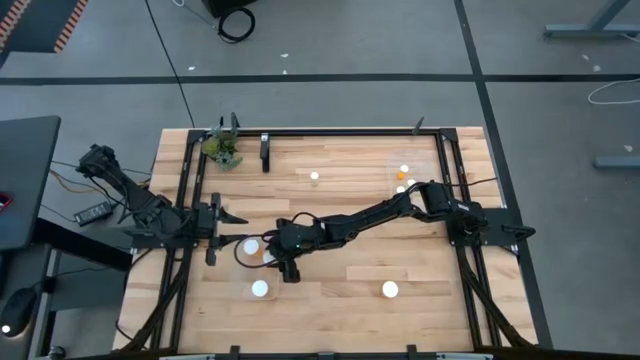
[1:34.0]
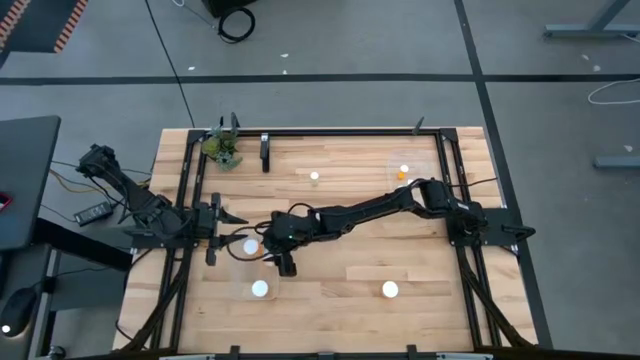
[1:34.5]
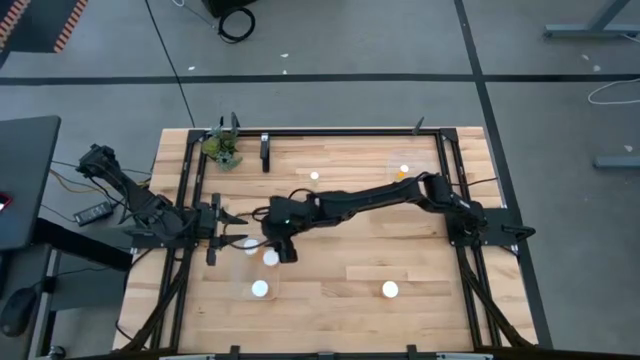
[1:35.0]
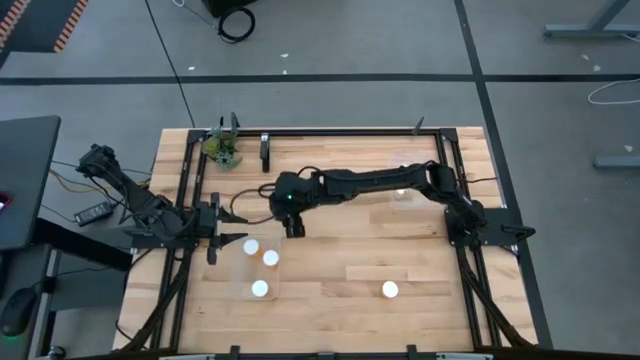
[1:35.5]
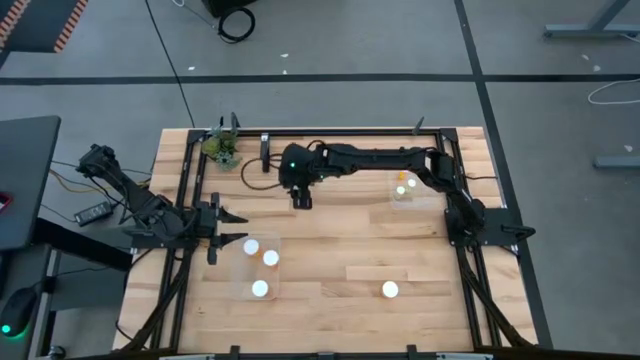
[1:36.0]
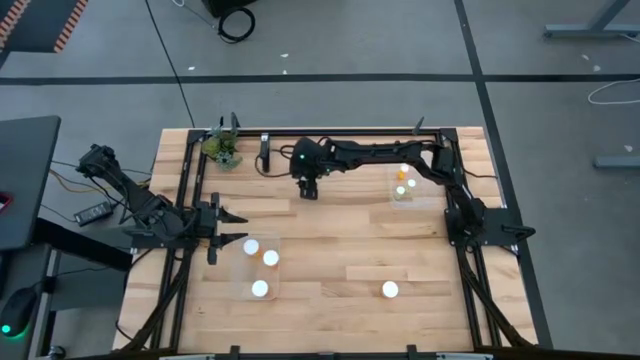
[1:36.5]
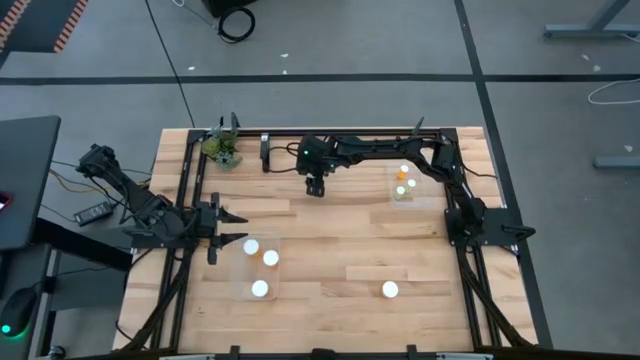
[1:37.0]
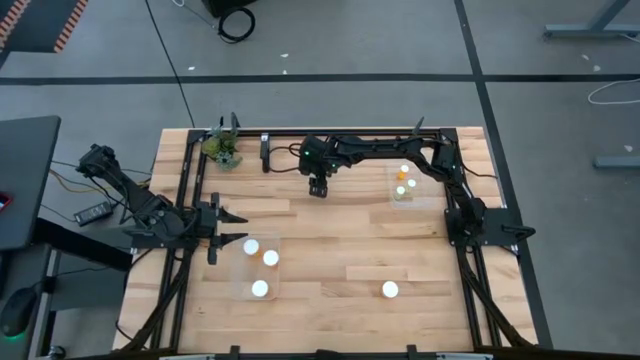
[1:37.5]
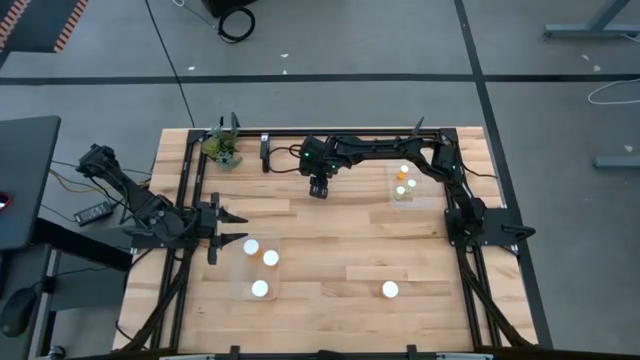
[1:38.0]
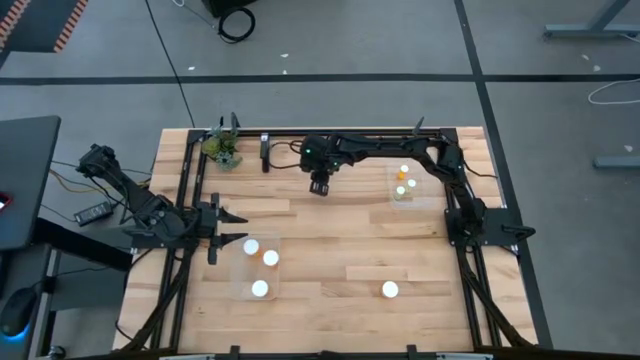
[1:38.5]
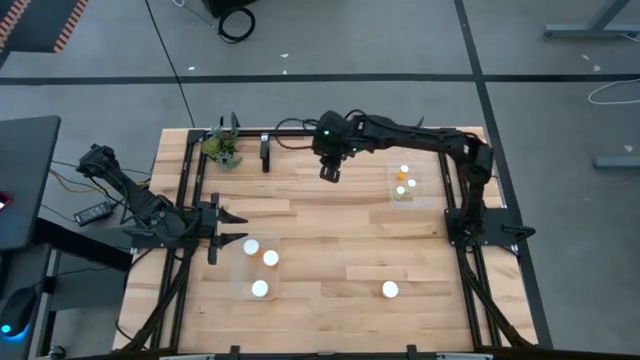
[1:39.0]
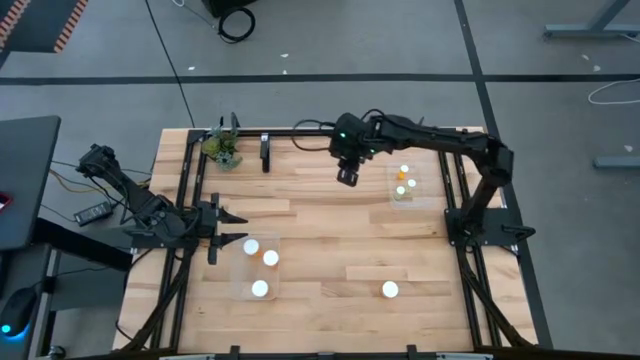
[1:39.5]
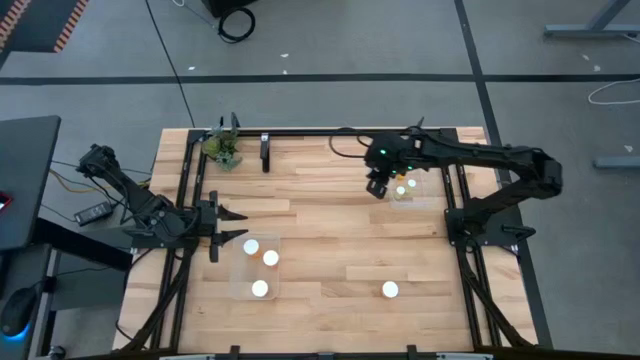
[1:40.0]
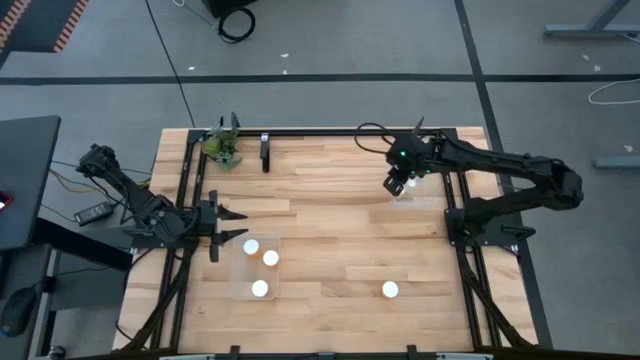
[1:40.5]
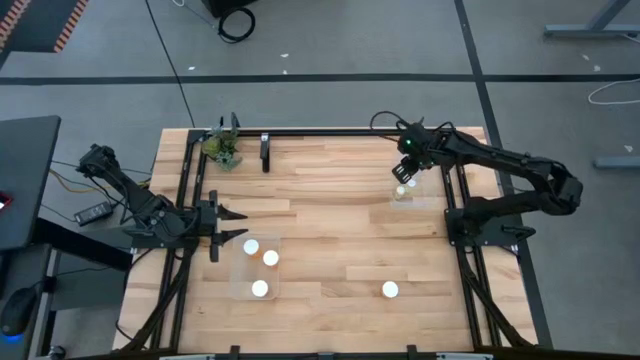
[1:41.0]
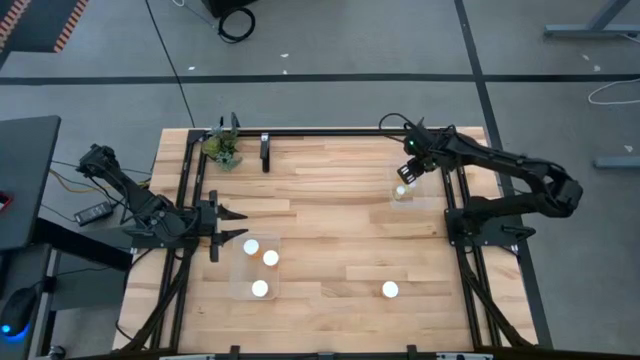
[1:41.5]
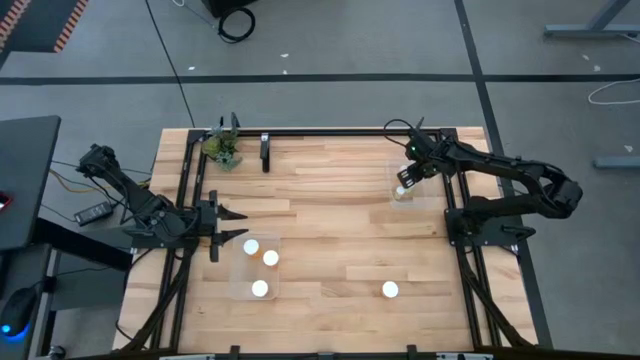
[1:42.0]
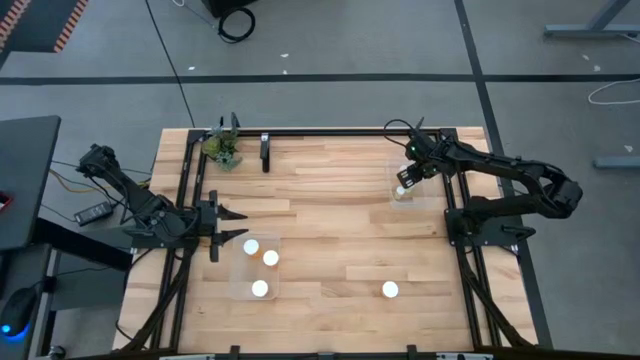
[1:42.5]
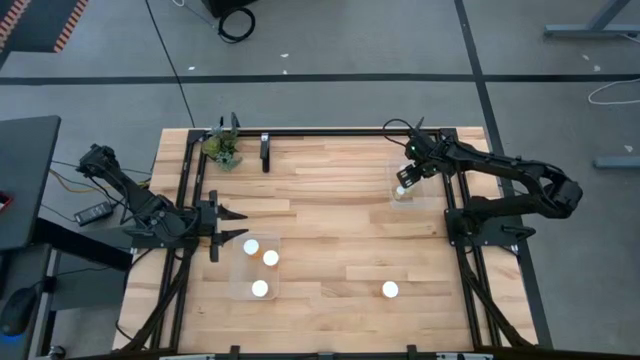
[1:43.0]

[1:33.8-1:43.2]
Task: Pick and place medicine bottles into bin by pill shape (circle, oval)
Put the yellow pill bottle into the top transparent bin

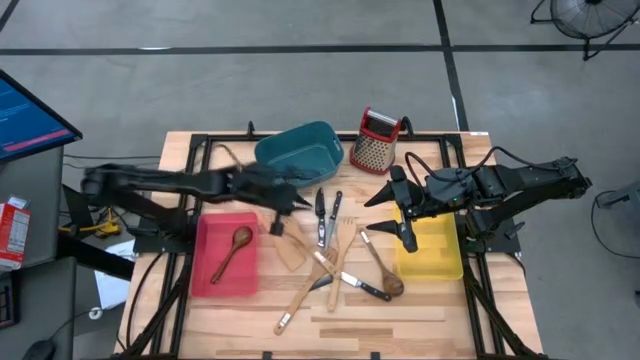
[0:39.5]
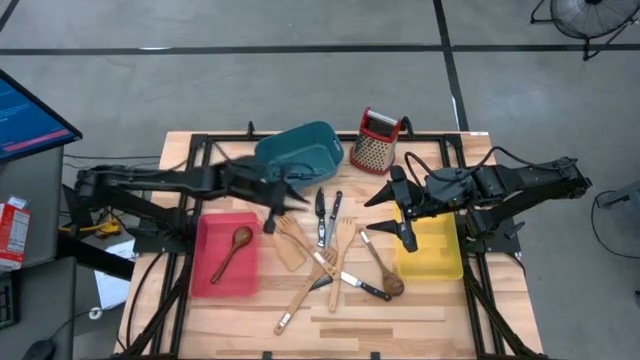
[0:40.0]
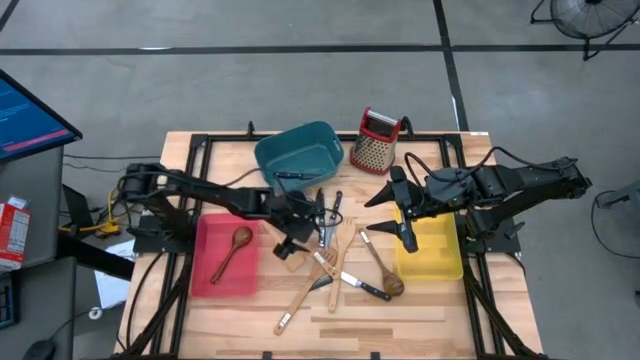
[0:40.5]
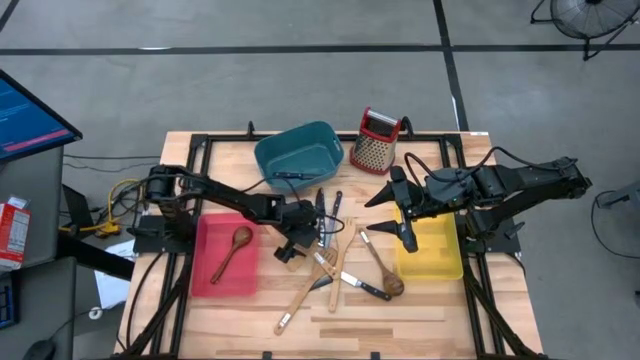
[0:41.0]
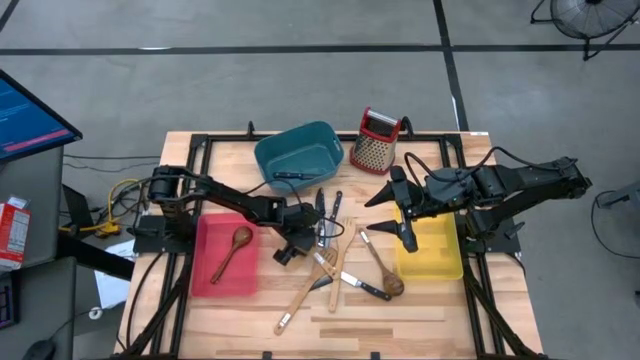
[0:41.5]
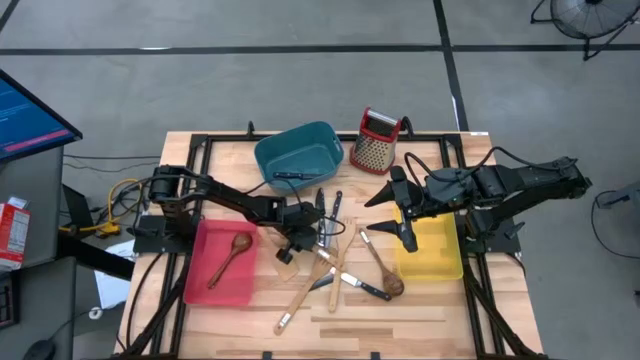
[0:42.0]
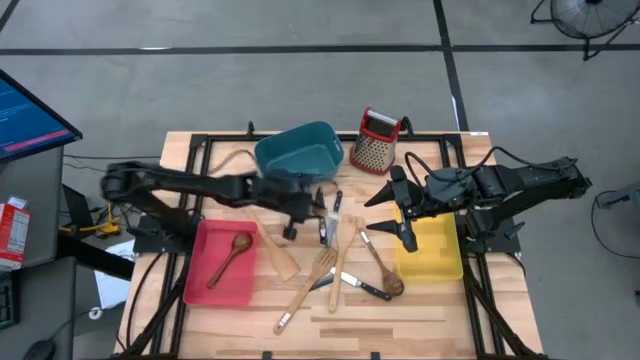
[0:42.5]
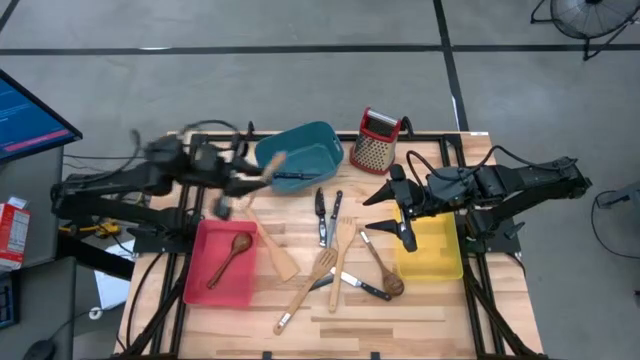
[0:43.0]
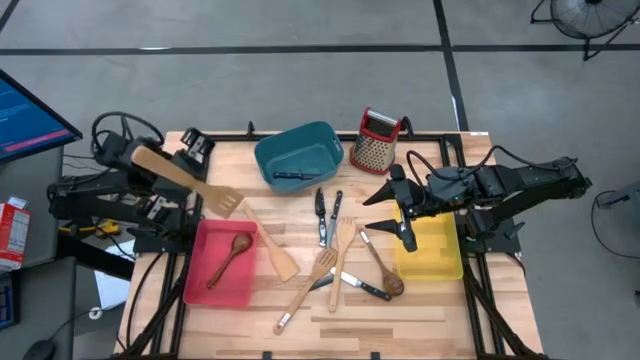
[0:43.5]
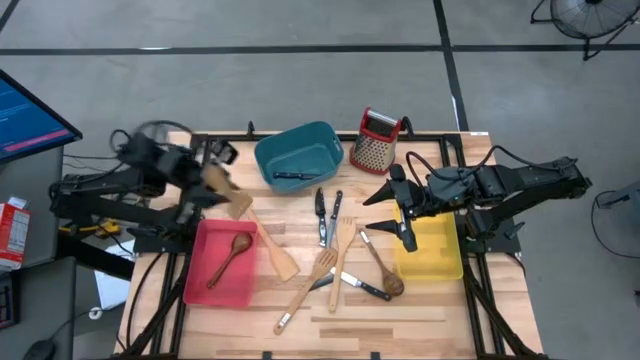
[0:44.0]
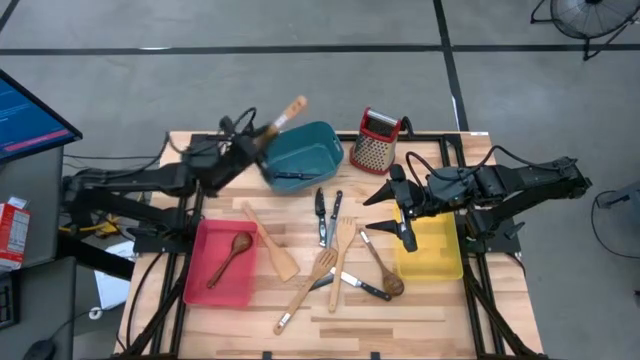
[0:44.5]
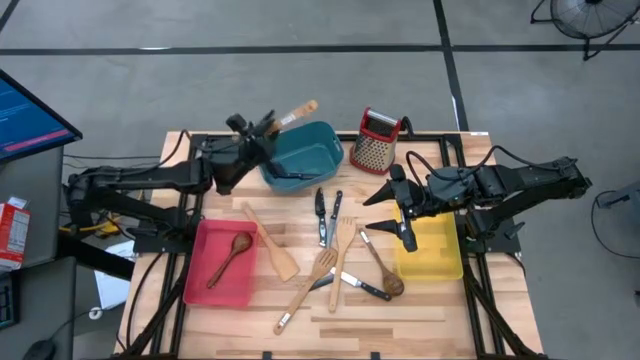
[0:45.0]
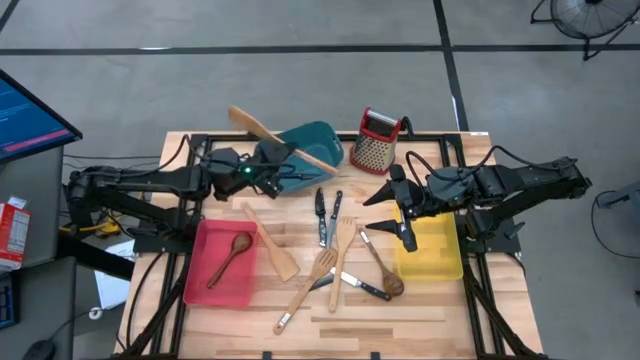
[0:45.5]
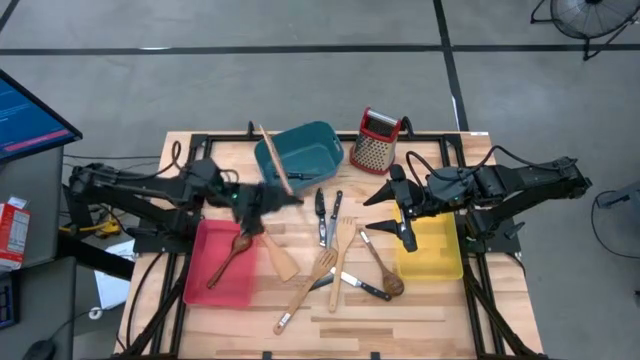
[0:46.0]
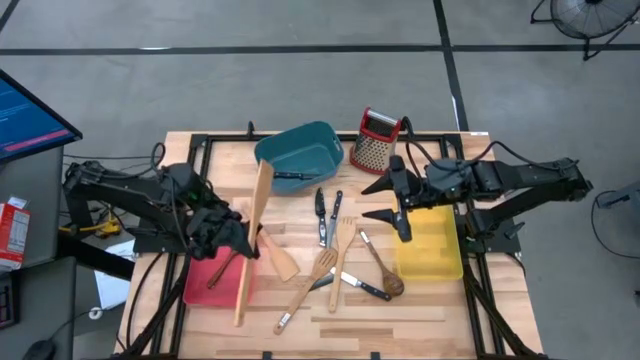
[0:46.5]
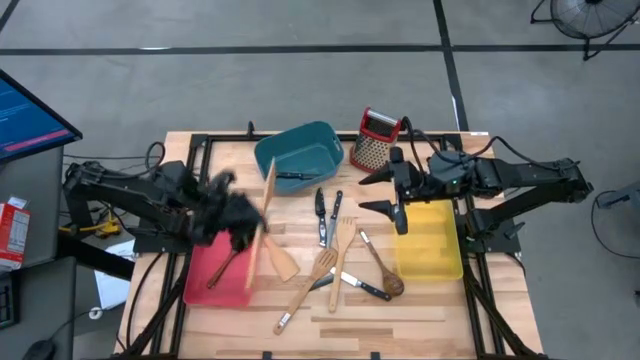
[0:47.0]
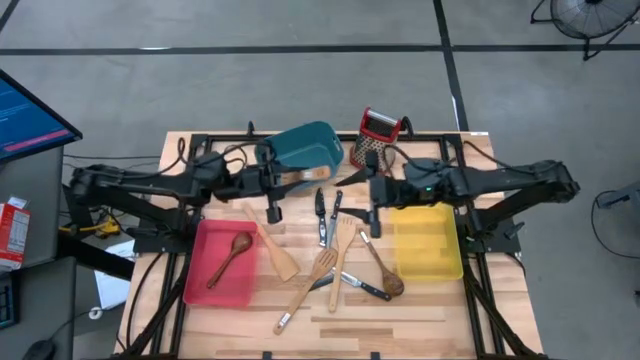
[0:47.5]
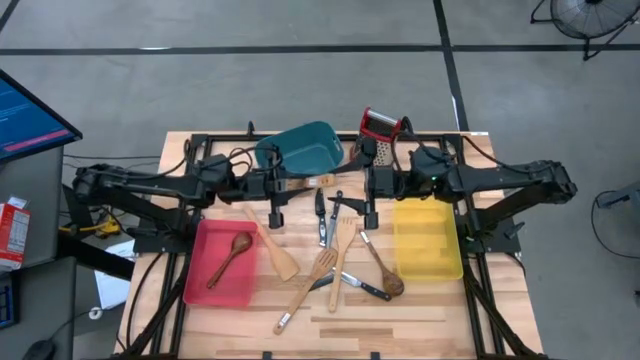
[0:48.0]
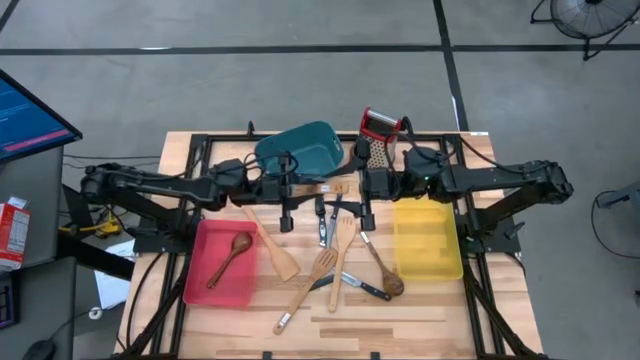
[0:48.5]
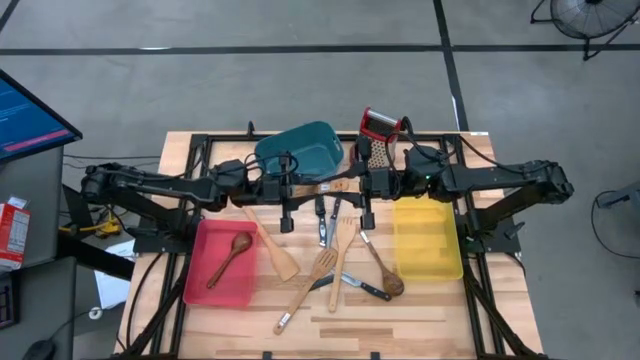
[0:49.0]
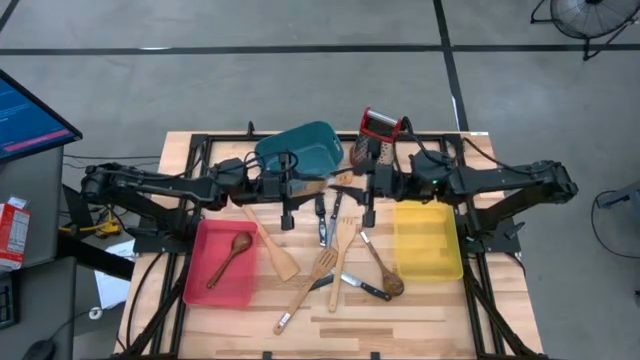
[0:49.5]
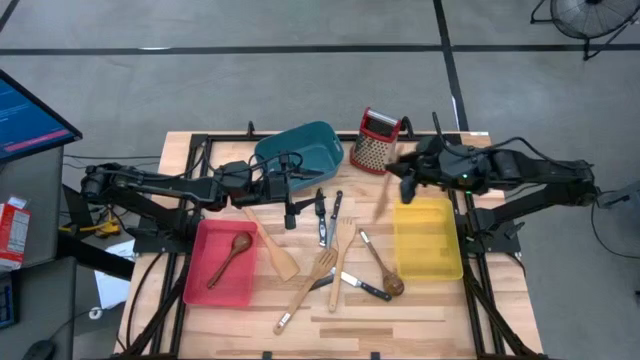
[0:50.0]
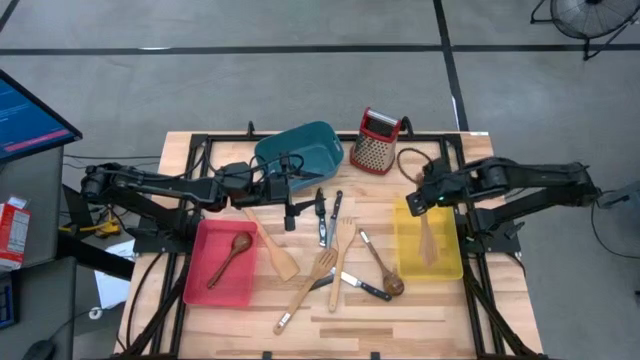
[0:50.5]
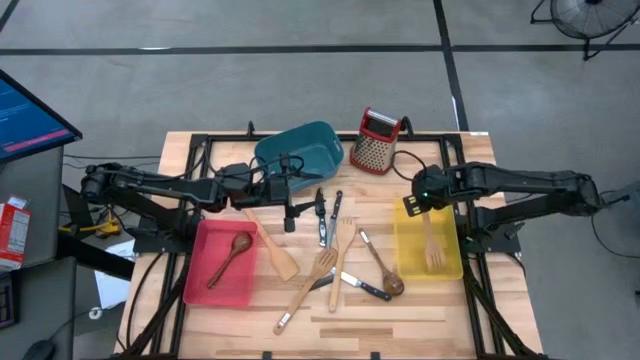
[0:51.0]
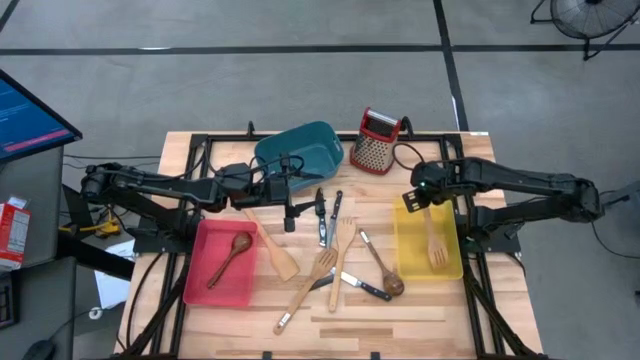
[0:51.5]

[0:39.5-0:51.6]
Task: Pick & Place Kitchen Items
Put the brown spatula into the yellow bin
